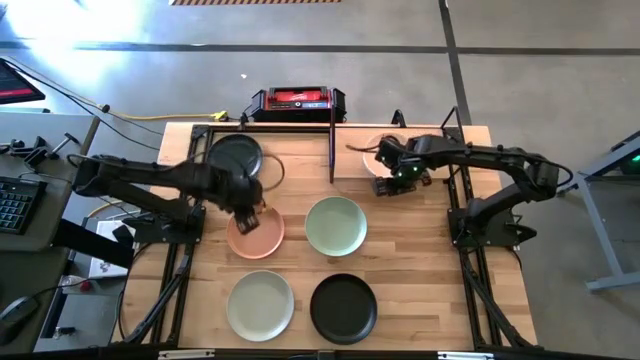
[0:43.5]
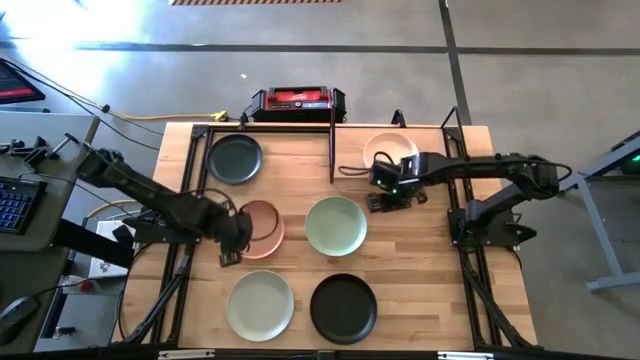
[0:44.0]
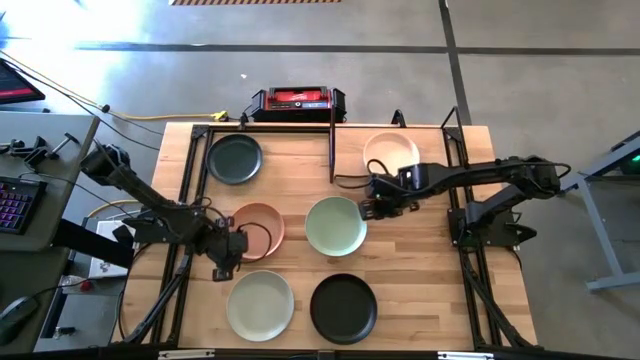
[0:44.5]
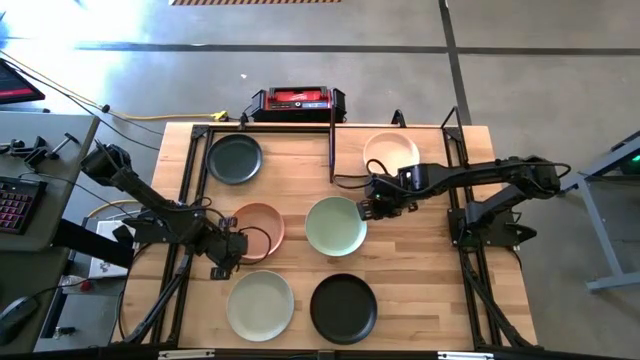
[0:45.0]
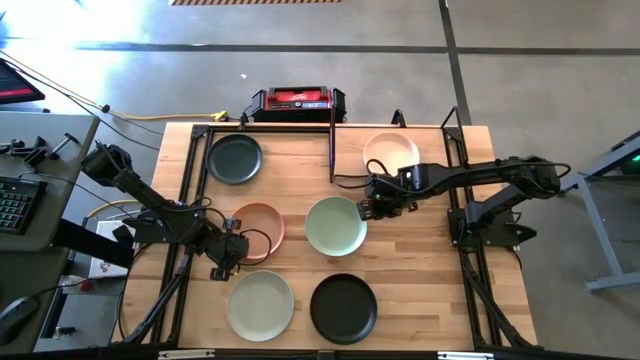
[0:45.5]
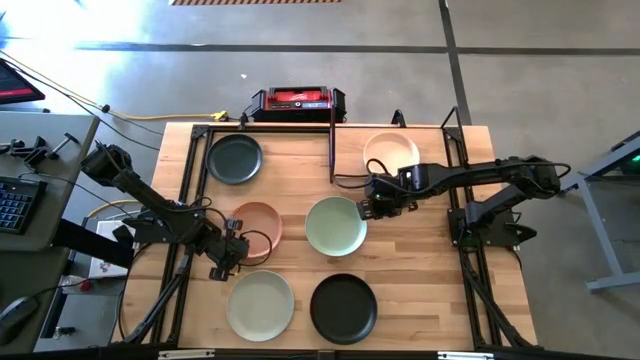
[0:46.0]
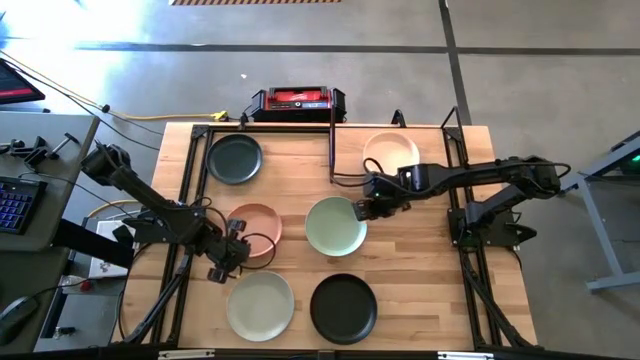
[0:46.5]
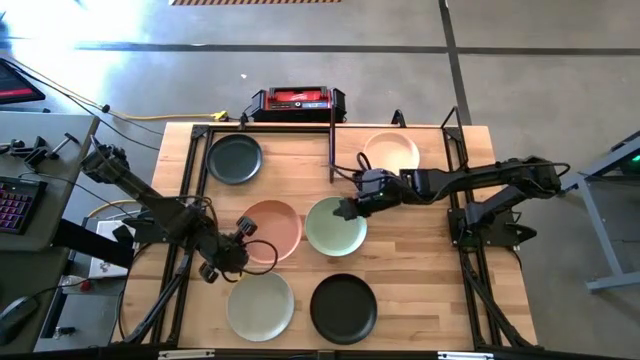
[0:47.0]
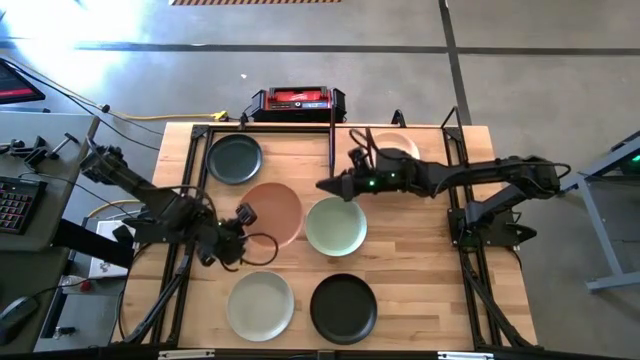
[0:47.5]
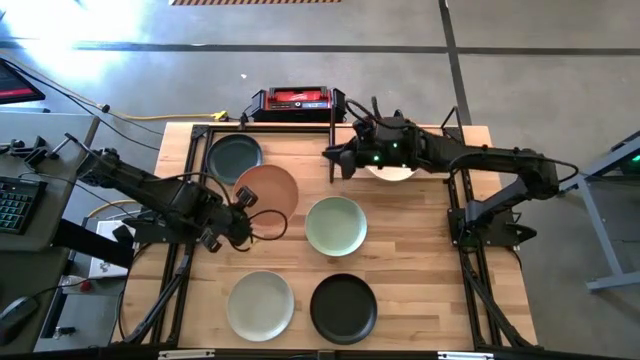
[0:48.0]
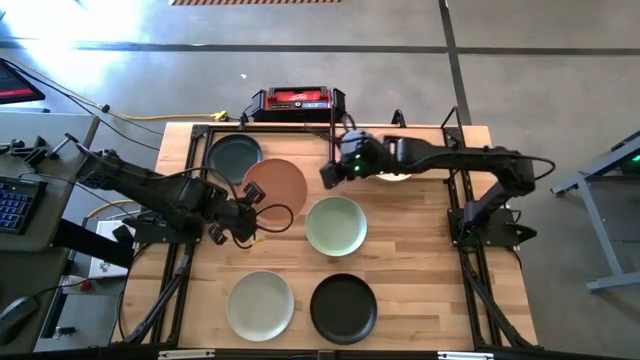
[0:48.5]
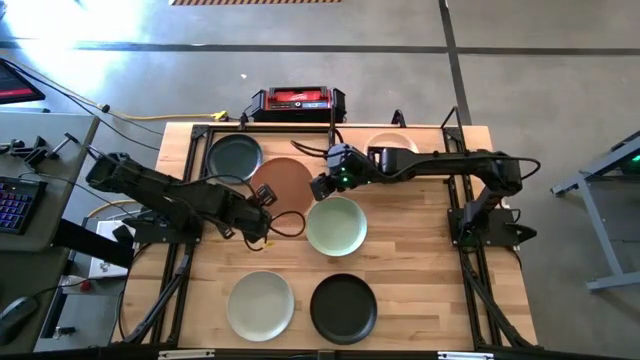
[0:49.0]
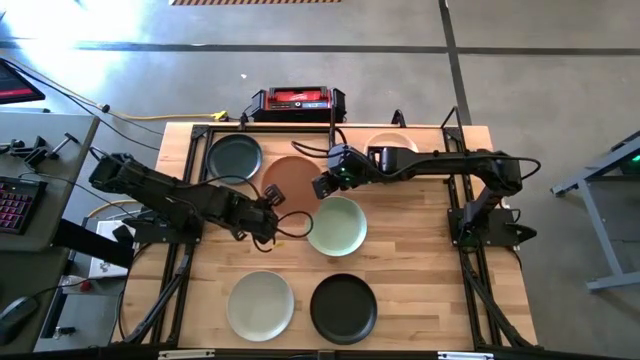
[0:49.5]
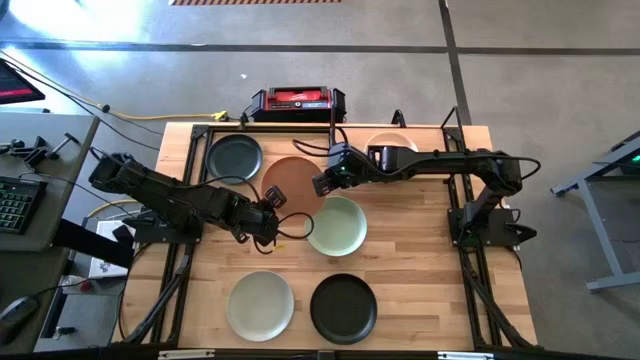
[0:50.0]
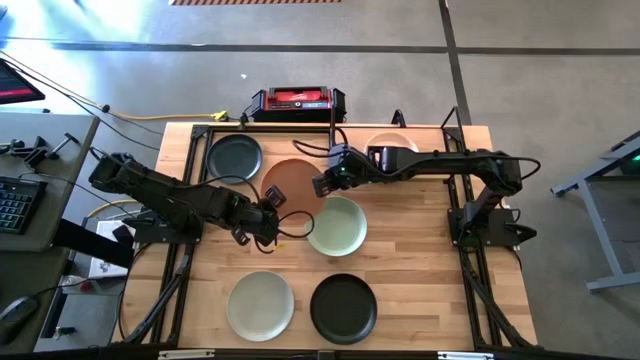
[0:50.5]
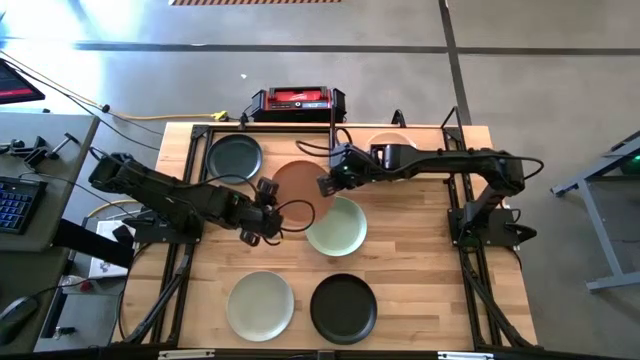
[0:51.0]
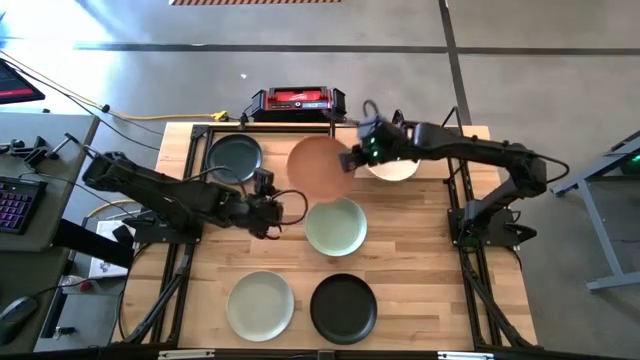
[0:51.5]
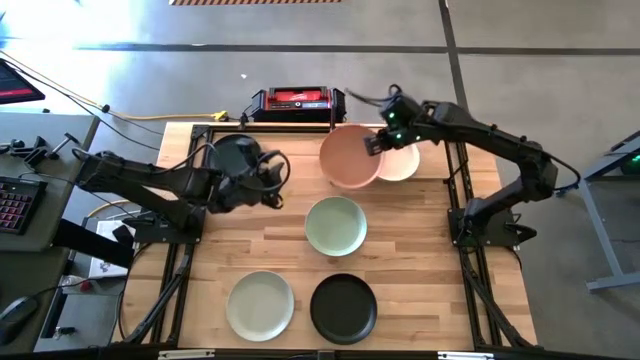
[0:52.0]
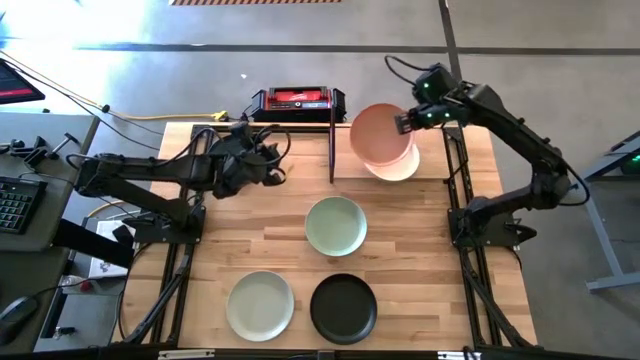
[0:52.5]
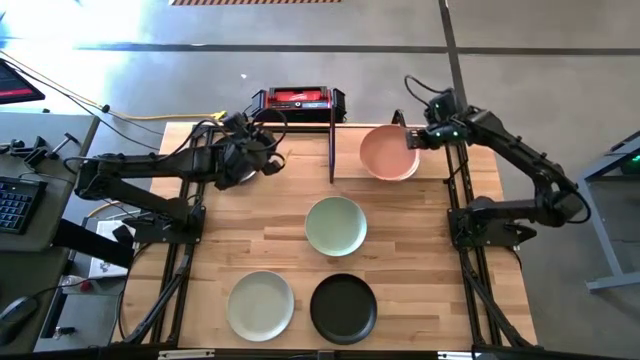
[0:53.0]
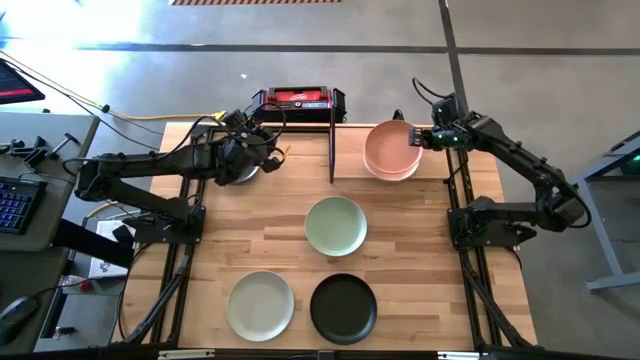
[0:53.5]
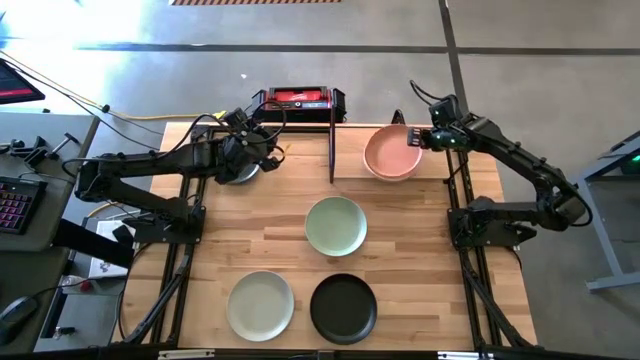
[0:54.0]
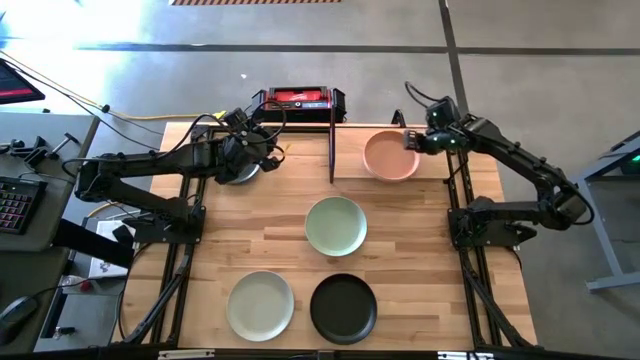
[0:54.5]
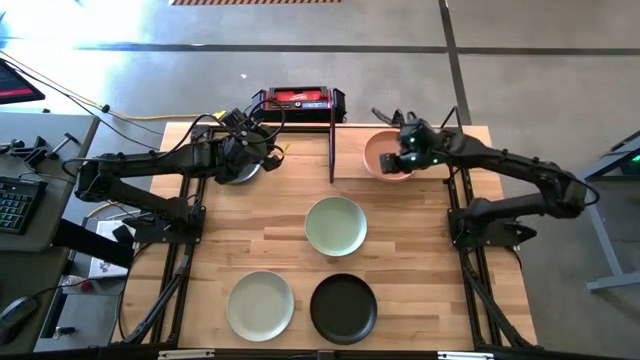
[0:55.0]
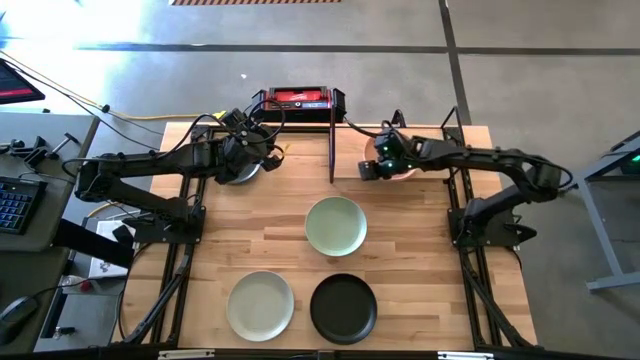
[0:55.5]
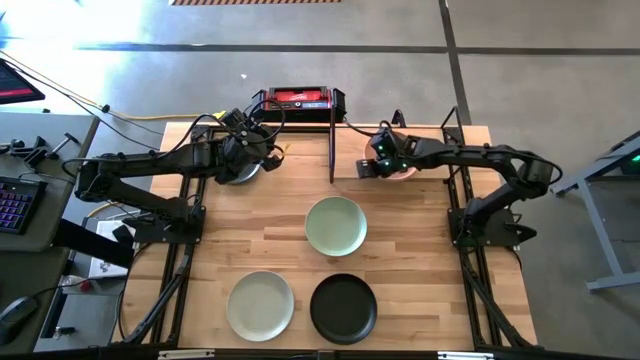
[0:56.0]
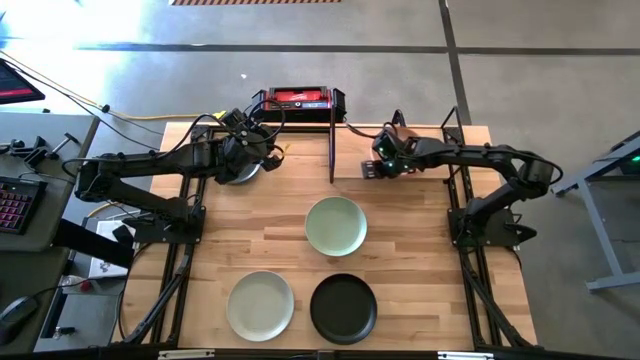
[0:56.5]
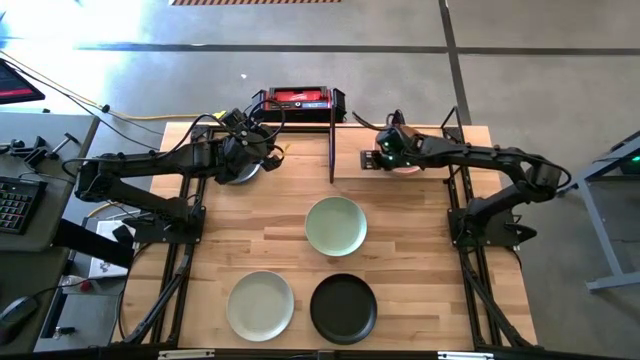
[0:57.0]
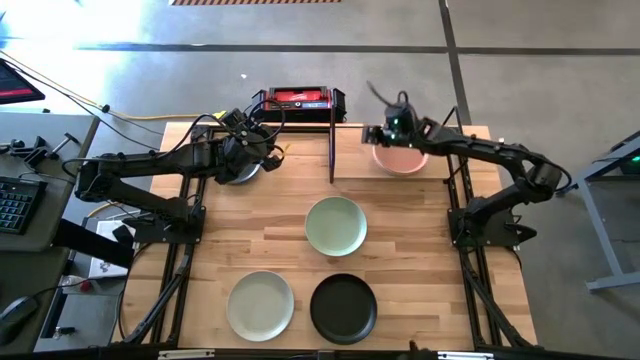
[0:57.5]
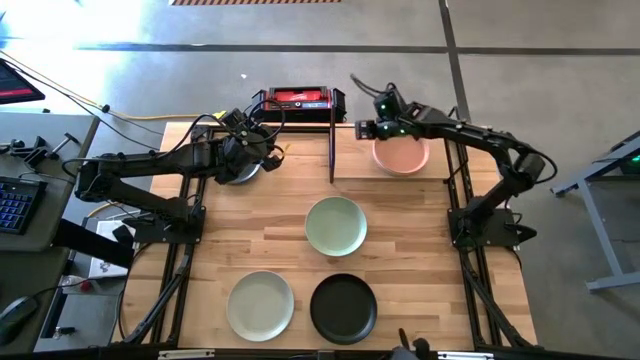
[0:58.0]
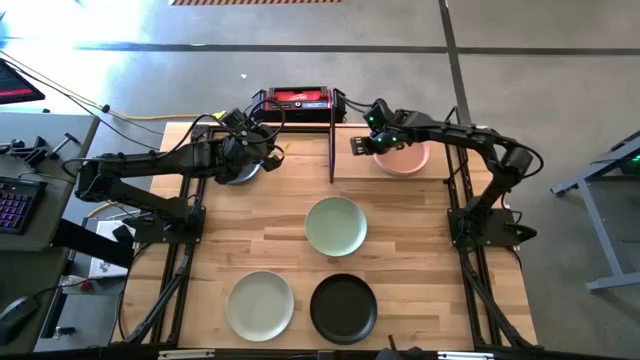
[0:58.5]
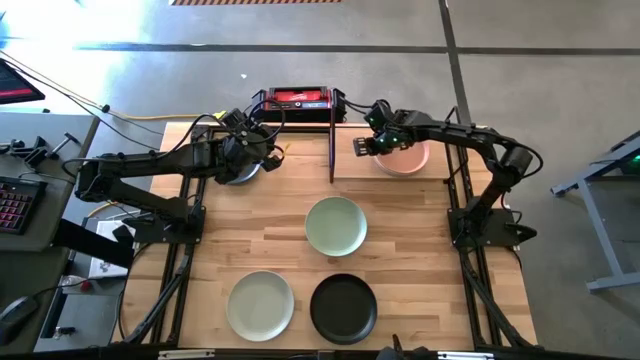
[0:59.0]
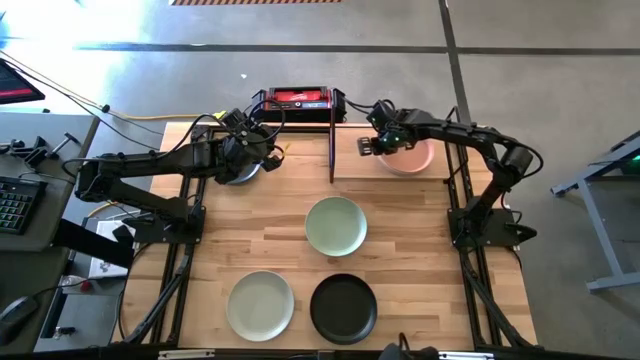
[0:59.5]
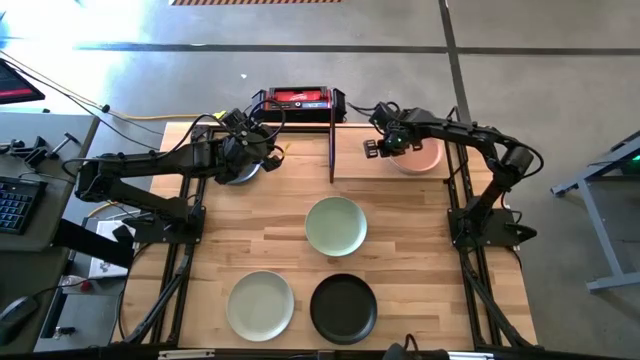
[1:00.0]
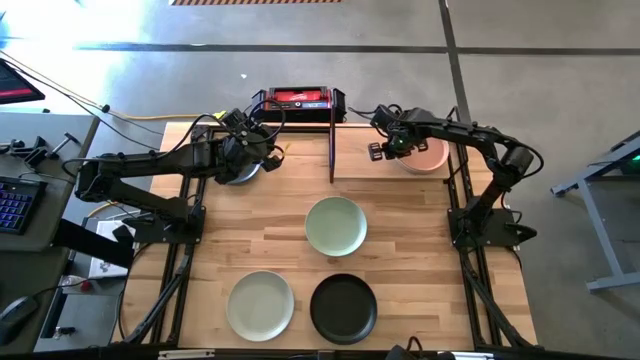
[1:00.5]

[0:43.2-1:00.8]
Task: Place and stack plates onto a shelf
Stack the light orange plate on top of the light pink plate on the shelf

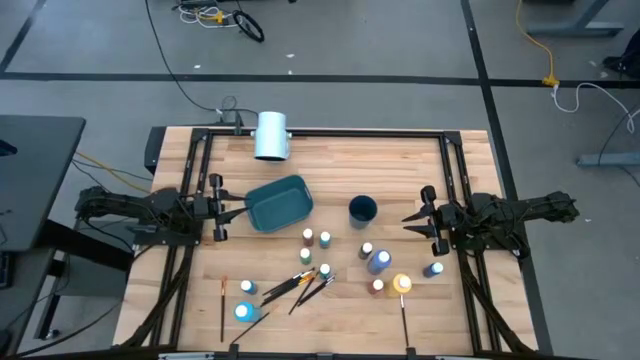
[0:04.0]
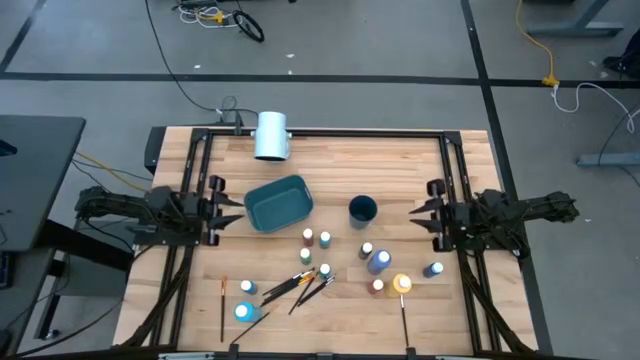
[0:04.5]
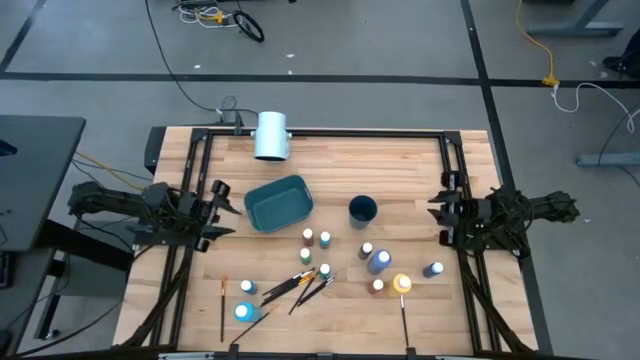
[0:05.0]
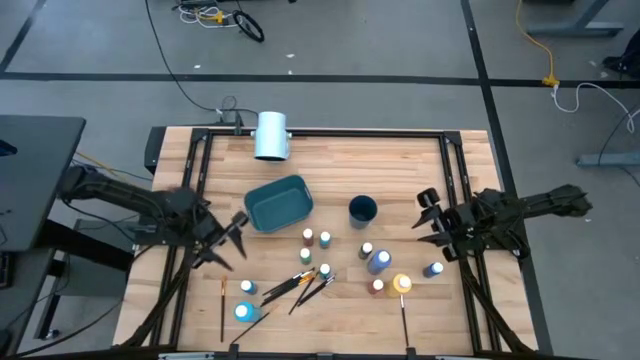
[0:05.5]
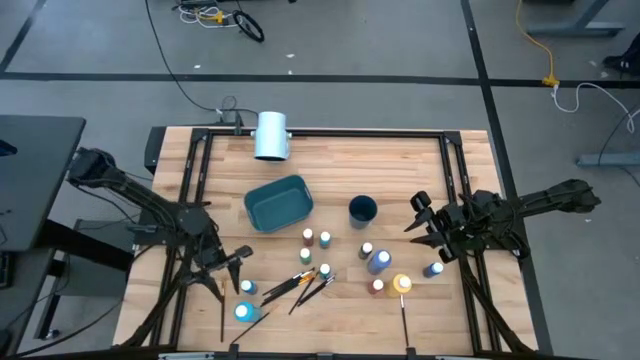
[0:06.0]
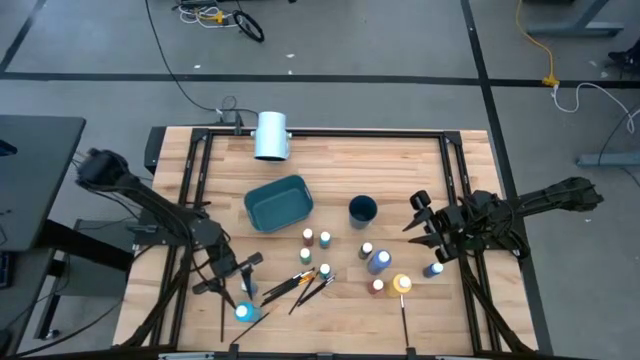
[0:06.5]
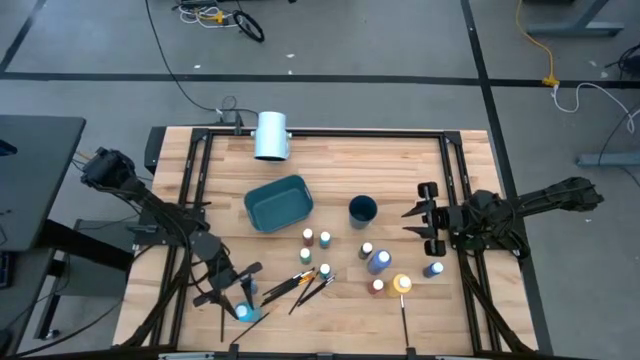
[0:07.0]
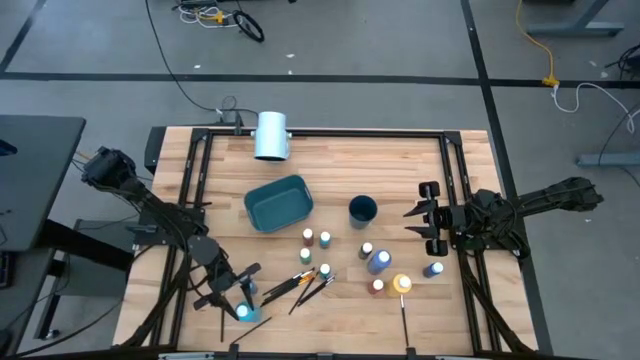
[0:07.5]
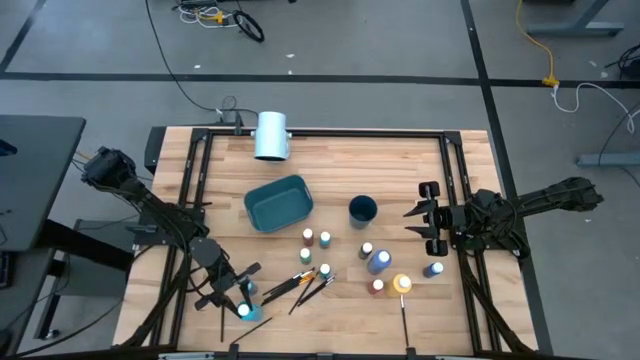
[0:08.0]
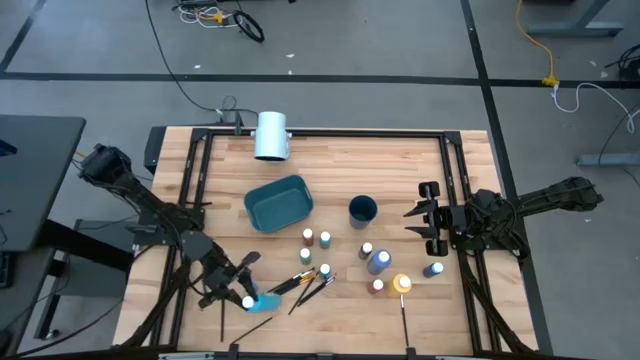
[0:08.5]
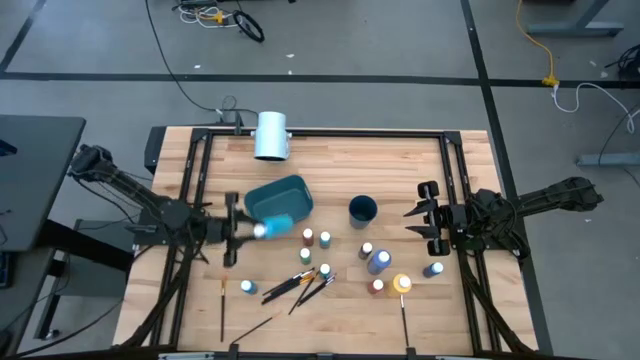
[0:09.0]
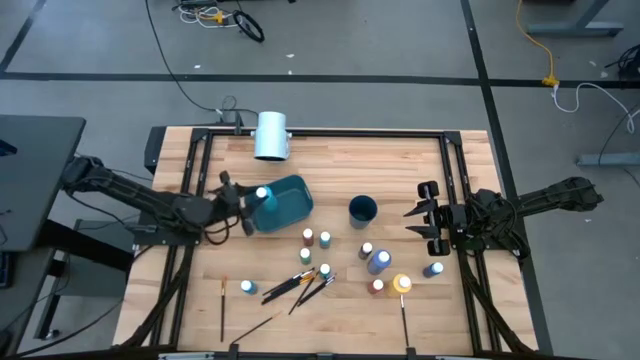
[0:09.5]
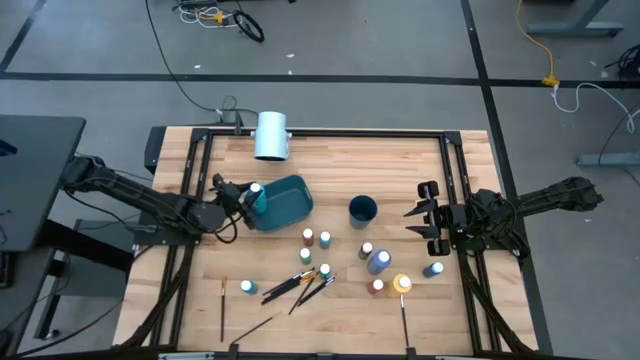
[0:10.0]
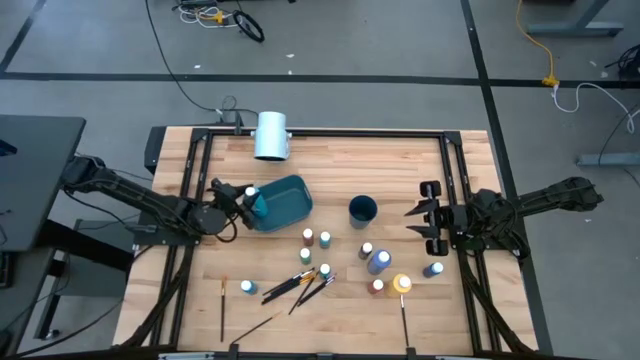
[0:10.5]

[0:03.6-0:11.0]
Task: Pick & Place Paint Supplies
Put the large light blue paint bottle into the blue bin
